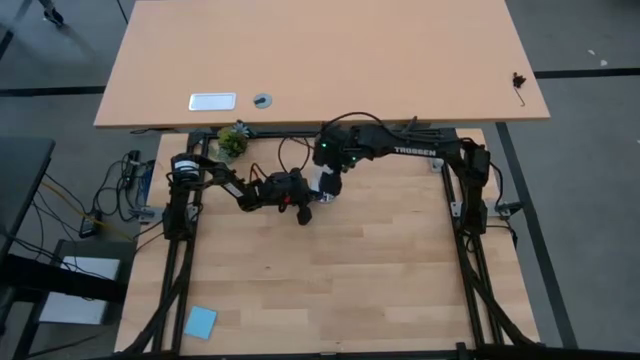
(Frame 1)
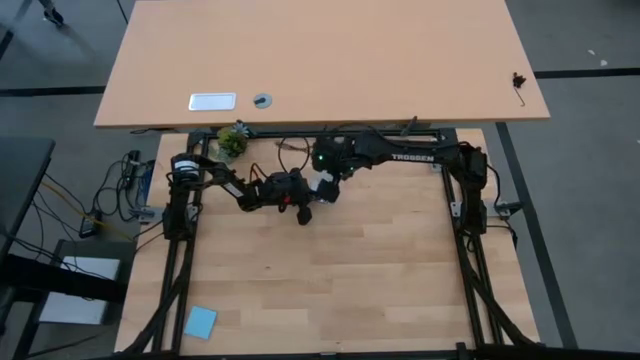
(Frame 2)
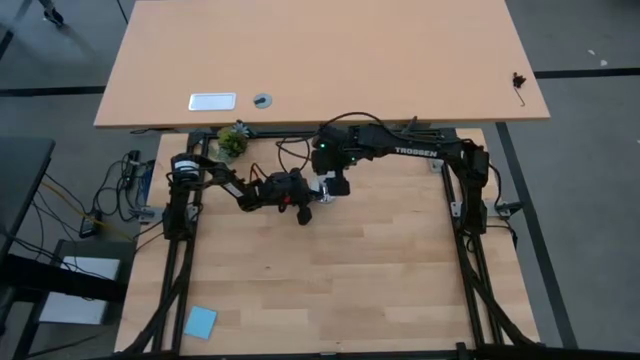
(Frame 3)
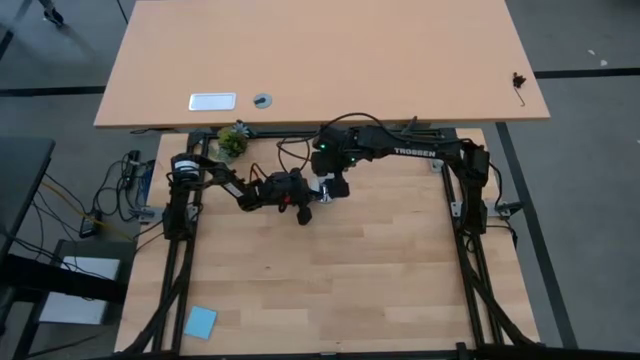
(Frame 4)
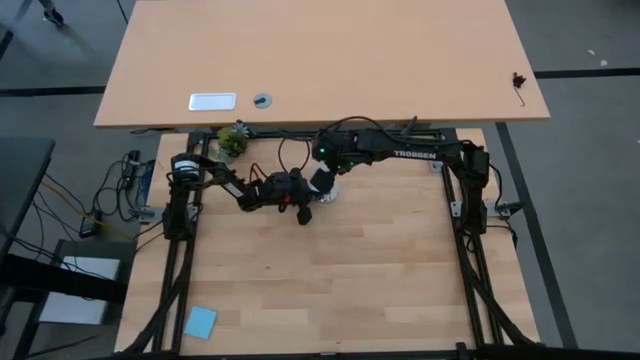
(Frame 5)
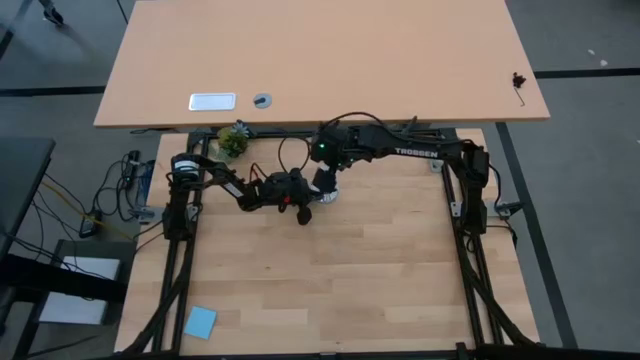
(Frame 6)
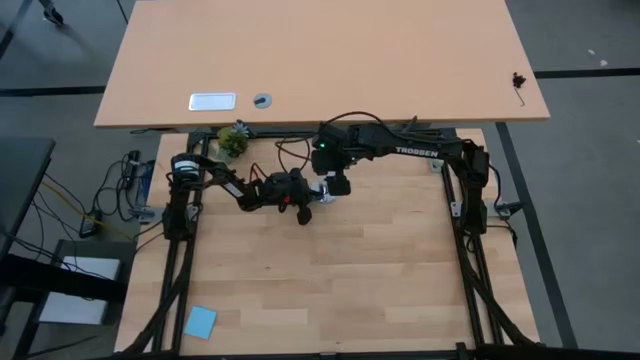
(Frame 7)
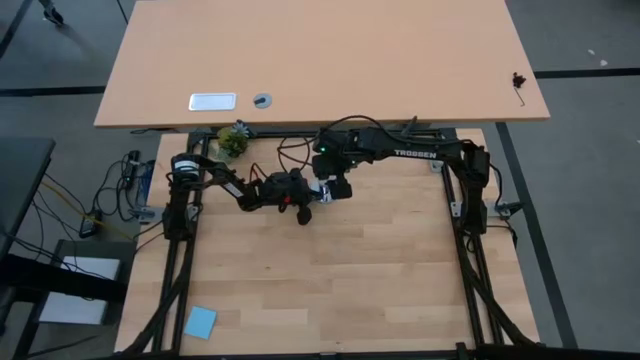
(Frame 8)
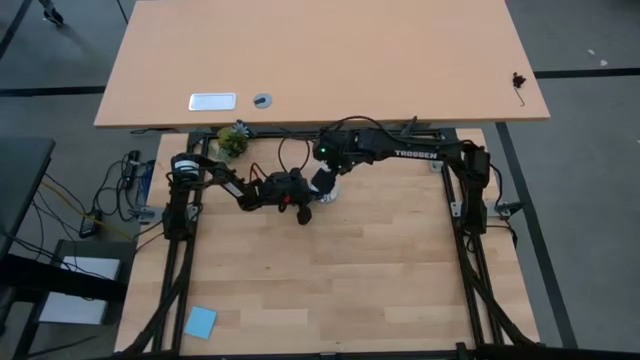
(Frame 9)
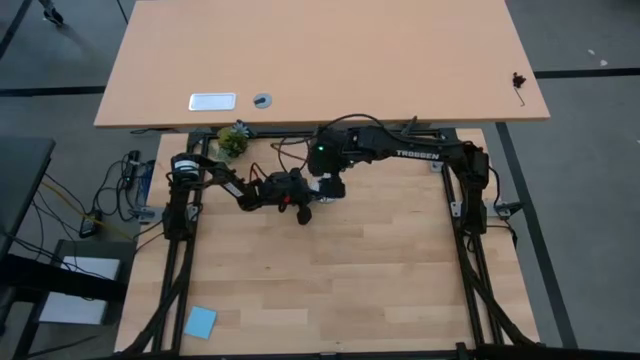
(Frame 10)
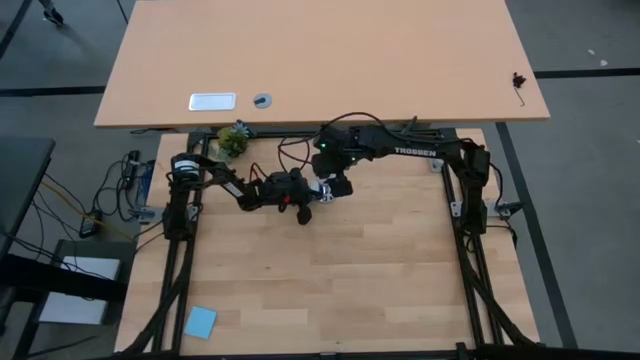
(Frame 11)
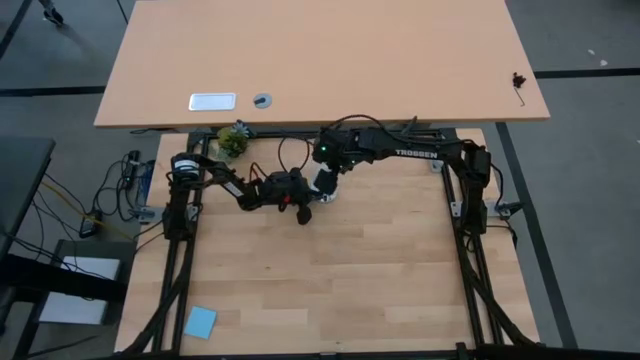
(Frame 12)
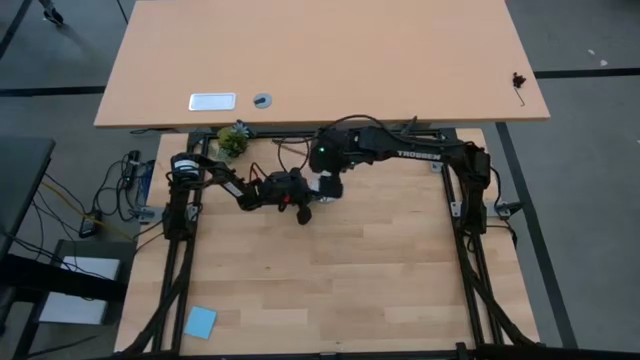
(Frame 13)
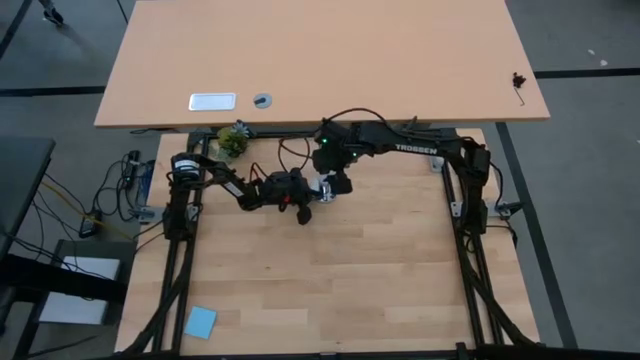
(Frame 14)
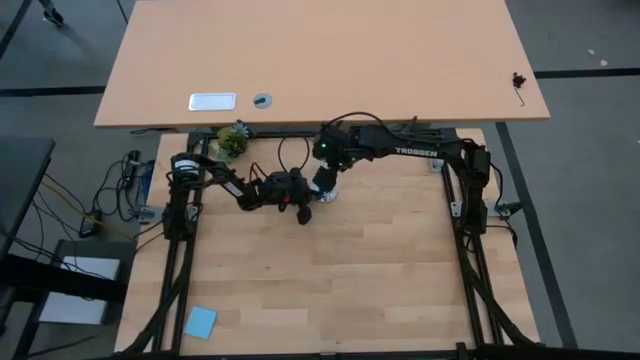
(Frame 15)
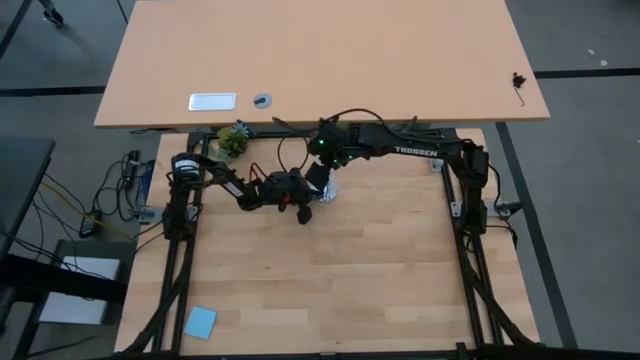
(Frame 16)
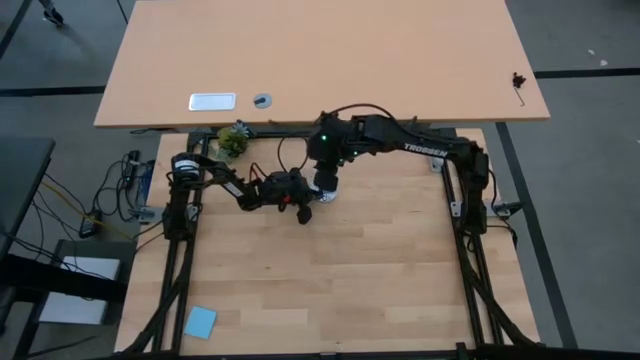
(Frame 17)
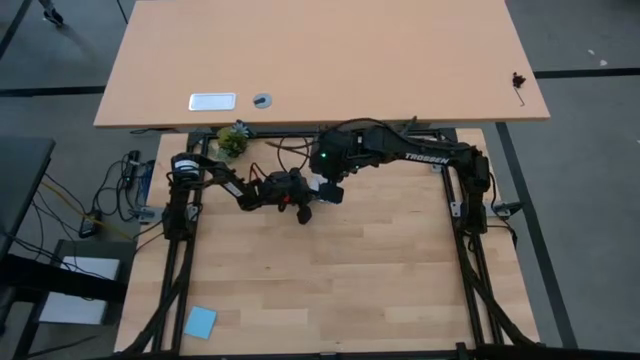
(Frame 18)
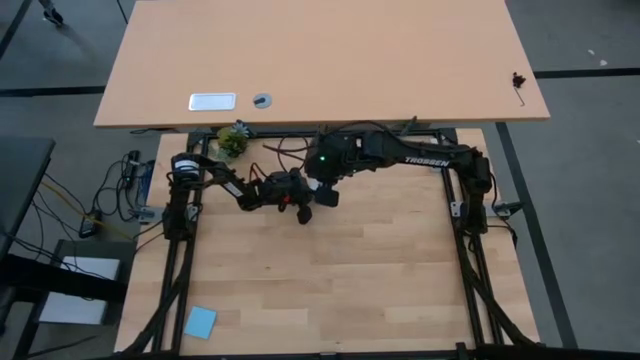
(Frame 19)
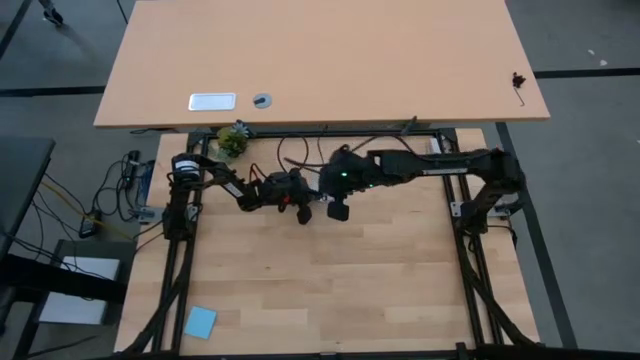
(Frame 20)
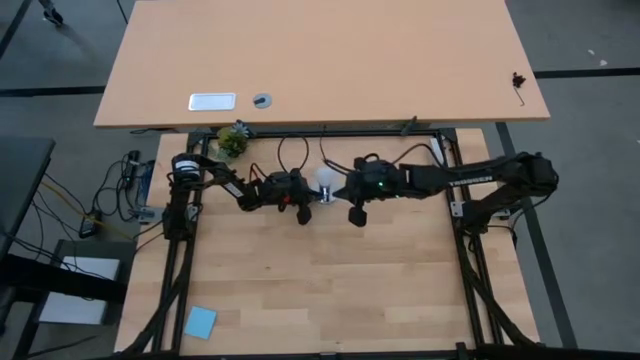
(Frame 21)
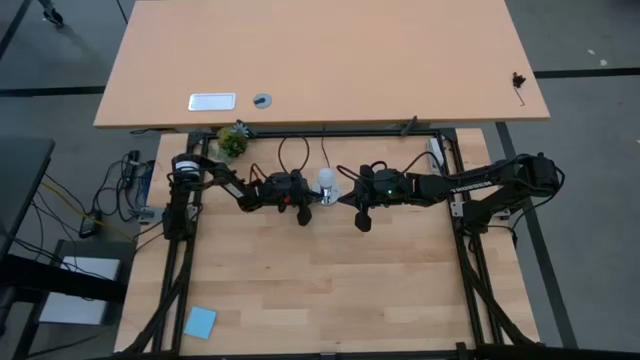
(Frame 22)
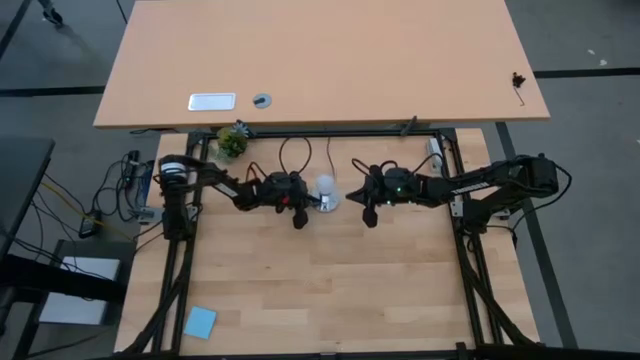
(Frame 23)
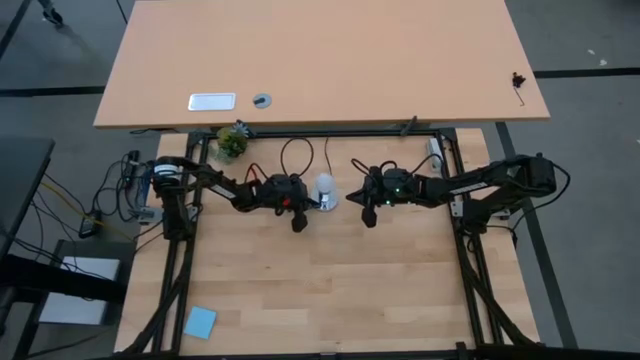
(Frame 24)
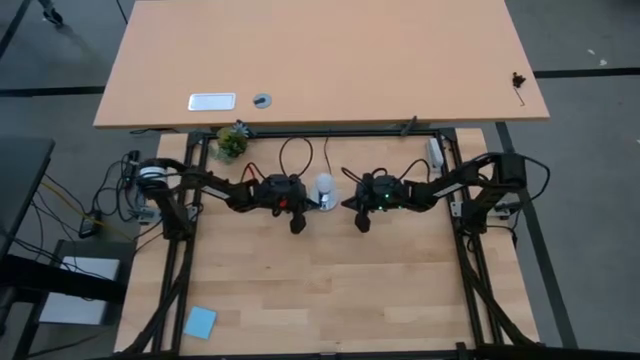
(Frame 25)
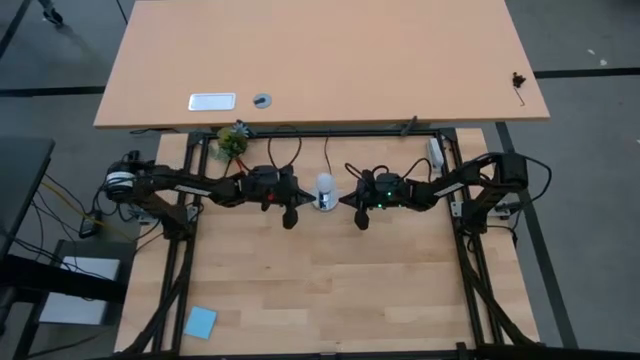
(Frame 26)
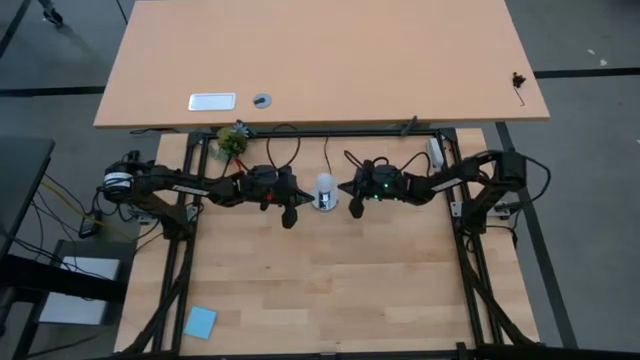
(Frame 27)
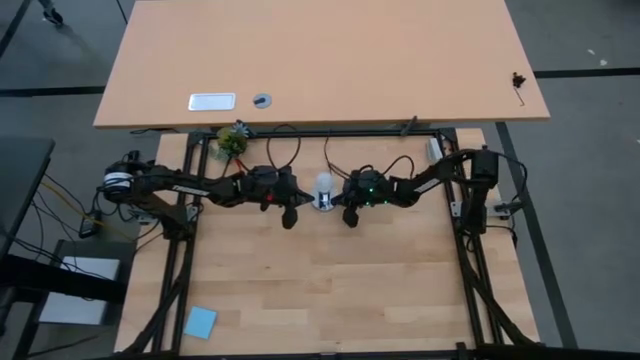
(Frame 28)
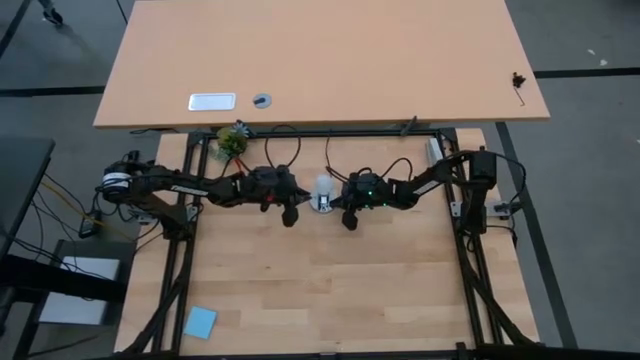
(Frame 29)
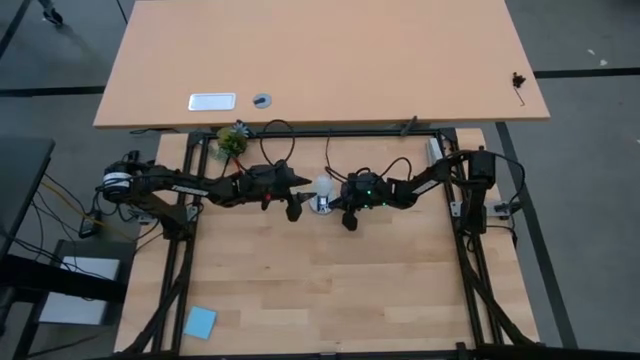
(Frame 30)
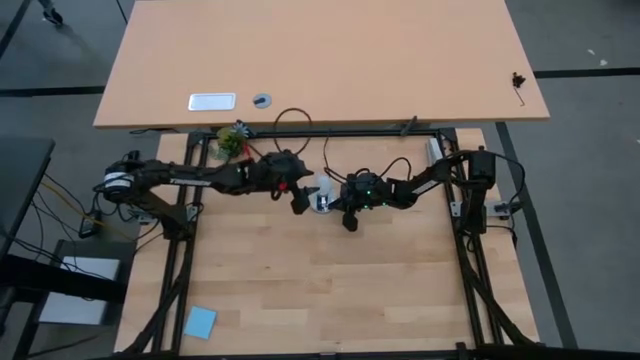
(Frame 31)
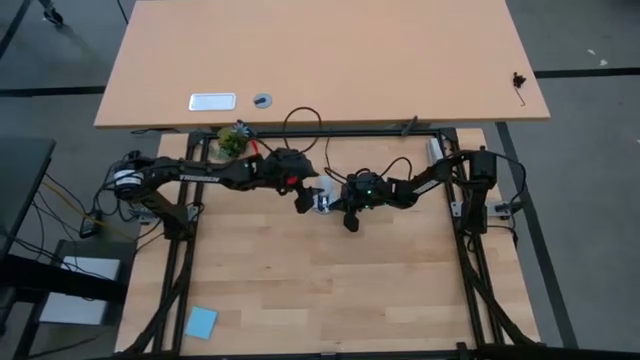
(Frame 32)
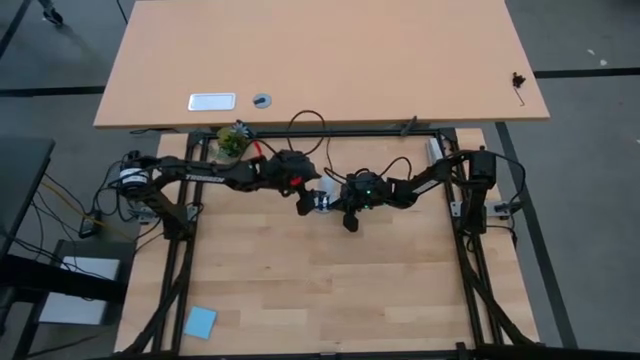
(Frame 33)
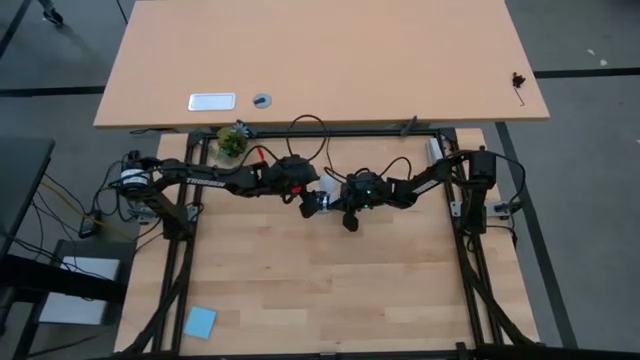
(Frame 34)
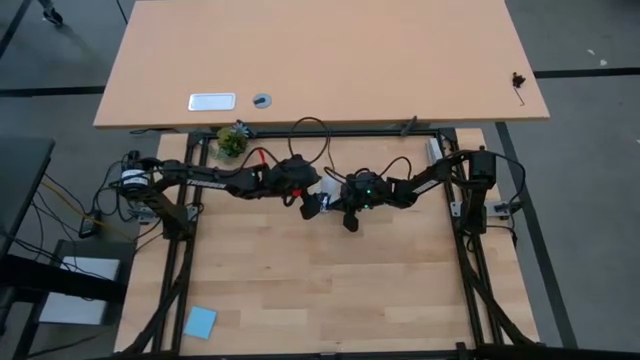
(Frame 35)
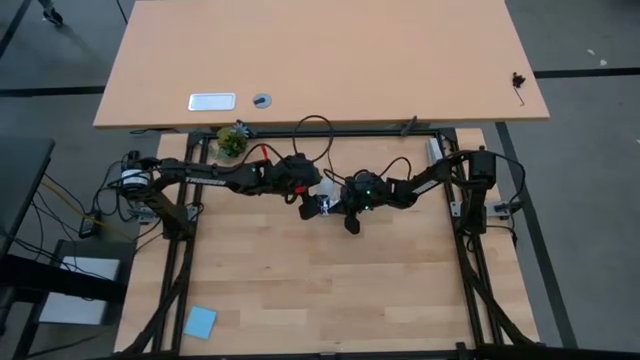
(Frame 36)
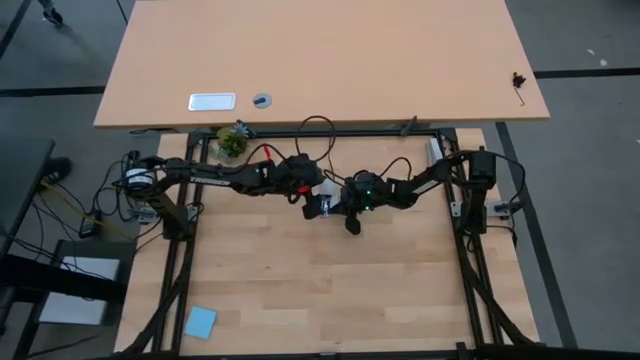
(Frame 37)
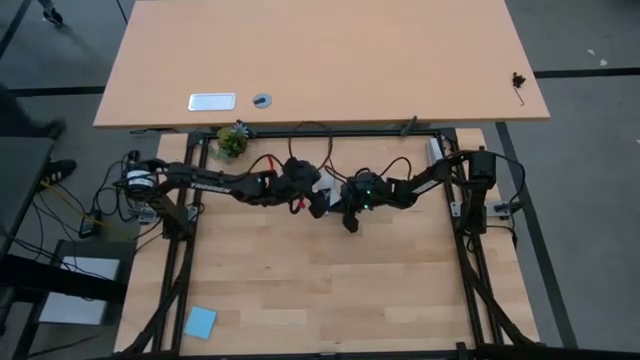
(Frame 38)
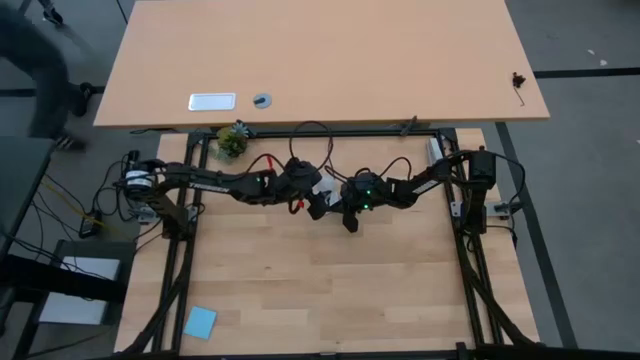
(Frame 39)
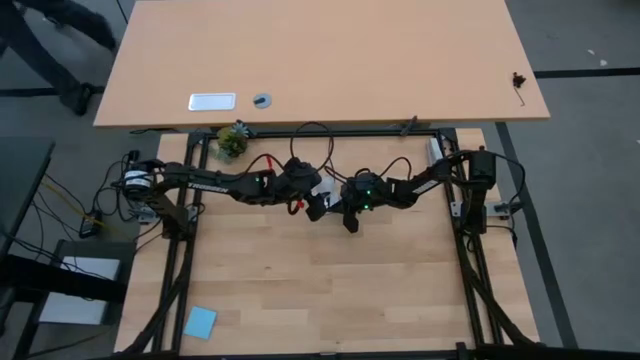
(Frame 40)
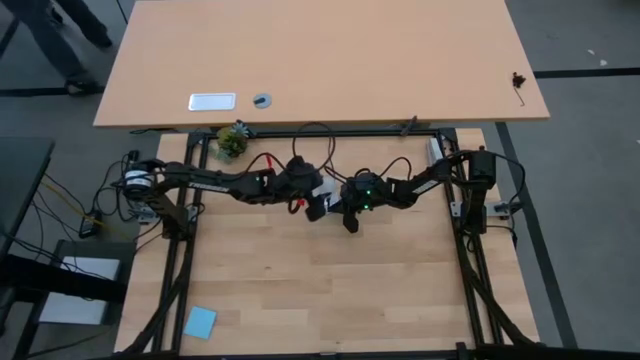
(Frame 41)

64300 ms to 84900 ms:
Task: Screw lightbulb
Insert the lightbulb into the lamp
